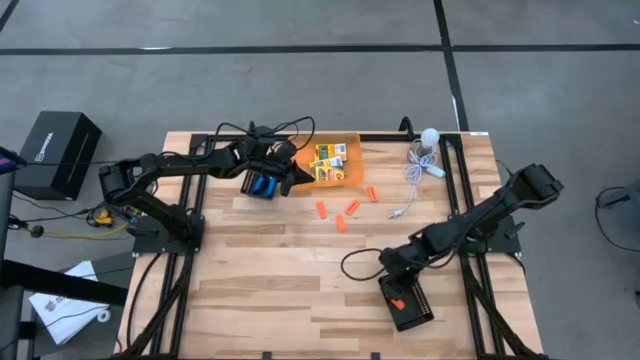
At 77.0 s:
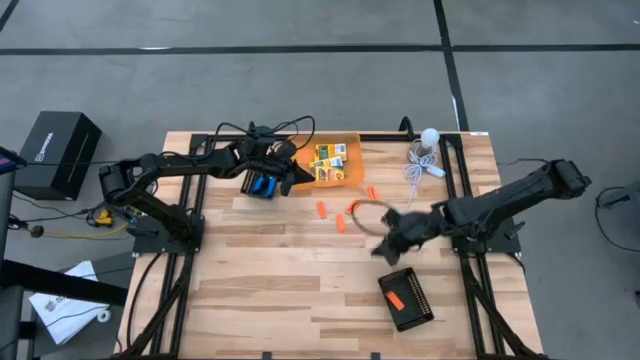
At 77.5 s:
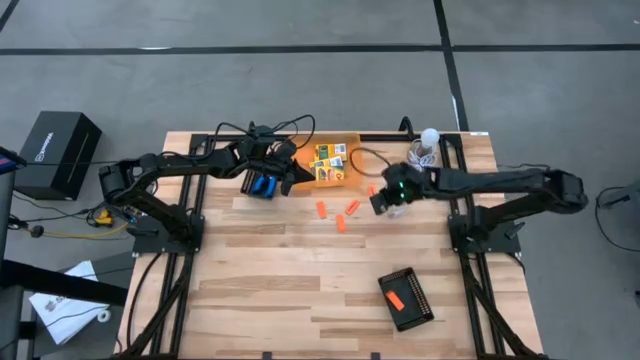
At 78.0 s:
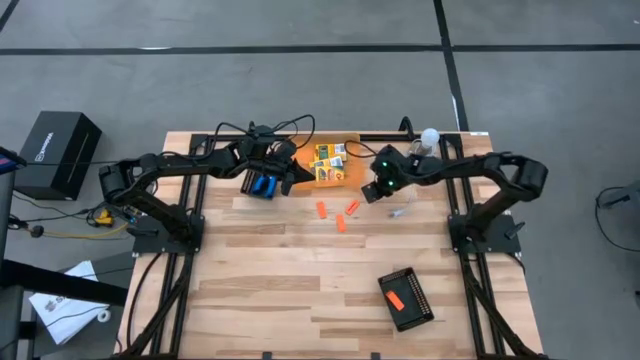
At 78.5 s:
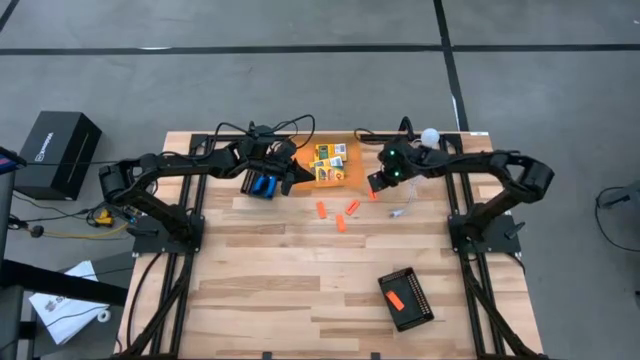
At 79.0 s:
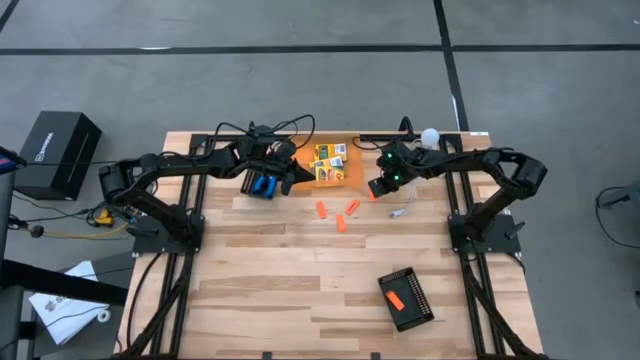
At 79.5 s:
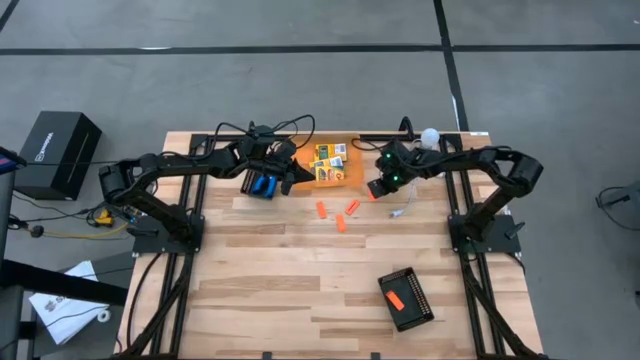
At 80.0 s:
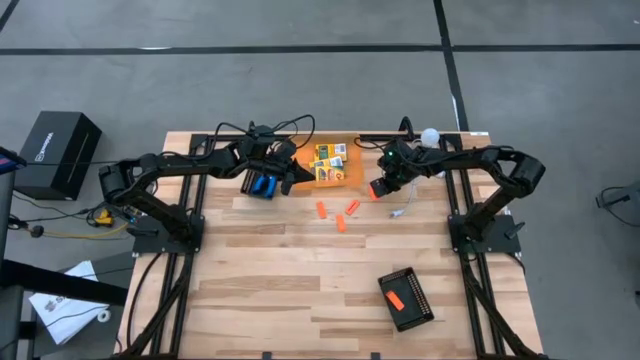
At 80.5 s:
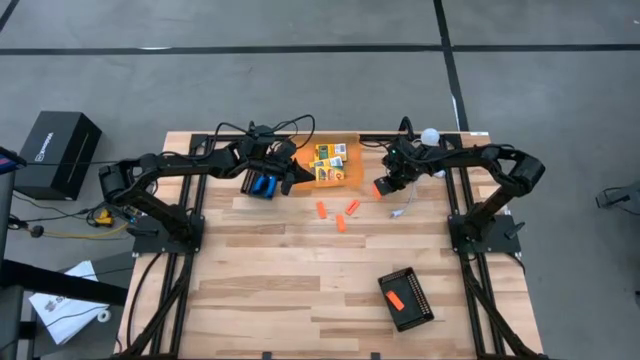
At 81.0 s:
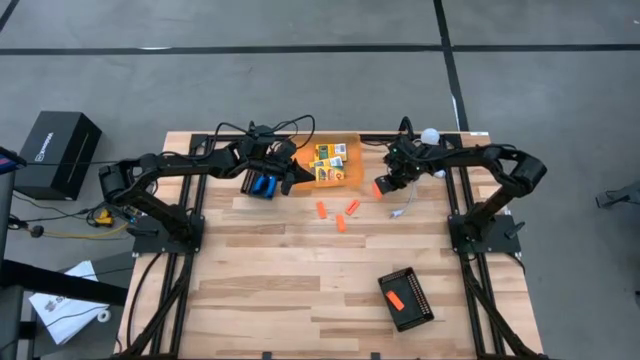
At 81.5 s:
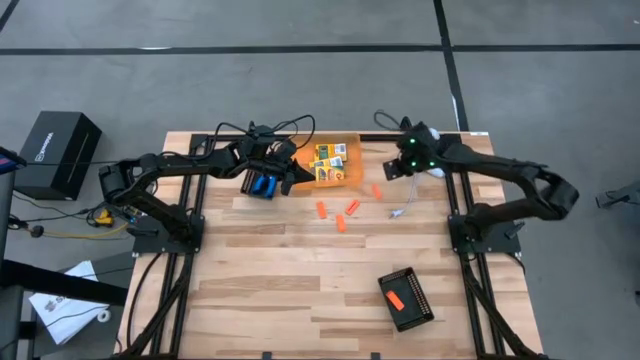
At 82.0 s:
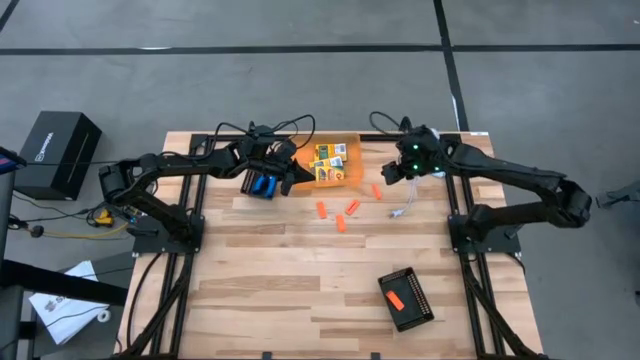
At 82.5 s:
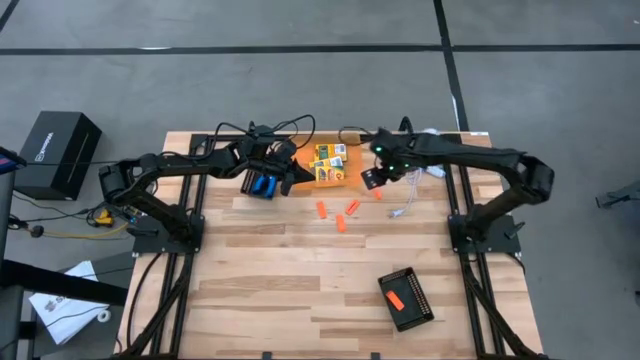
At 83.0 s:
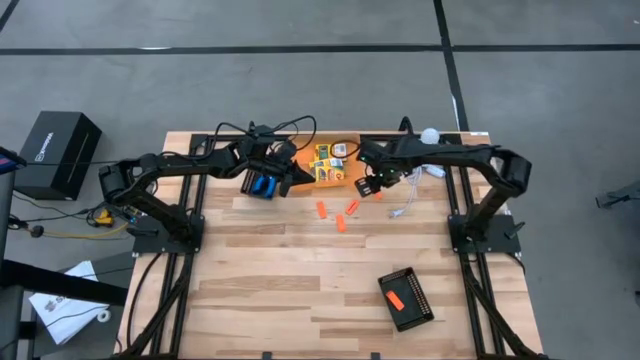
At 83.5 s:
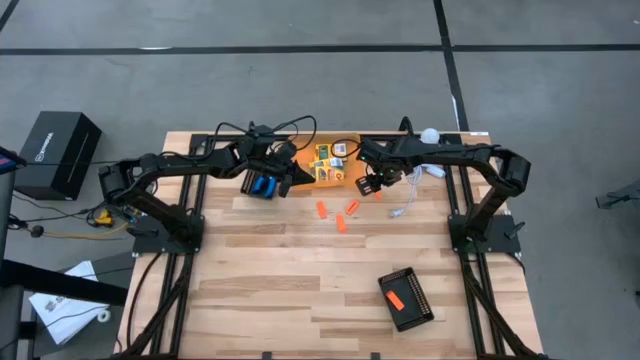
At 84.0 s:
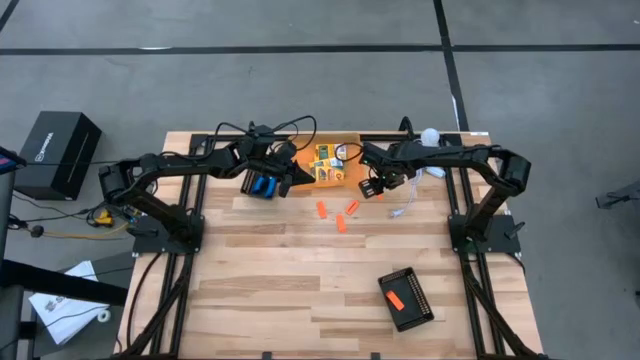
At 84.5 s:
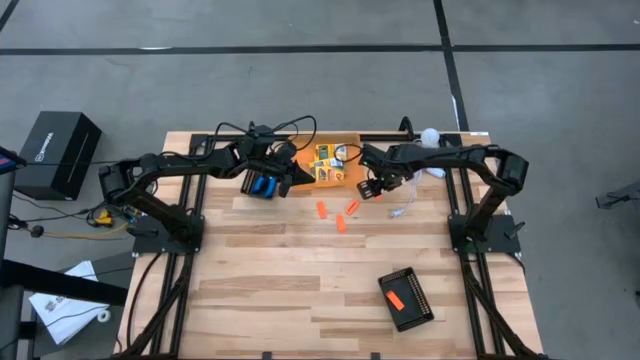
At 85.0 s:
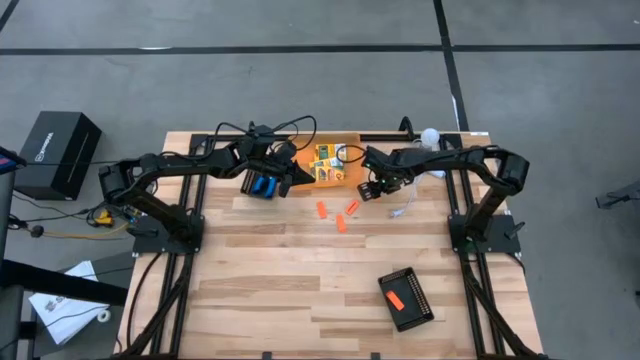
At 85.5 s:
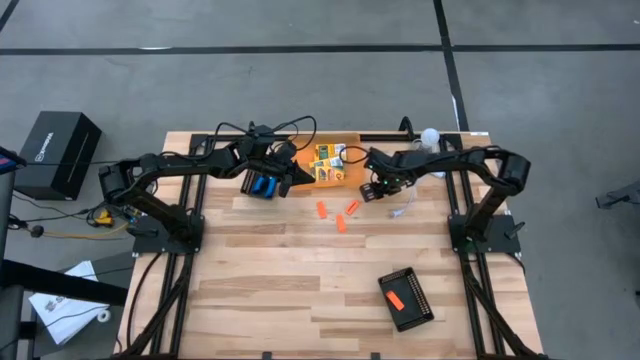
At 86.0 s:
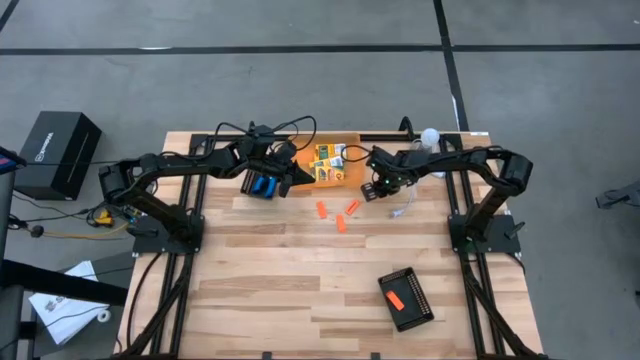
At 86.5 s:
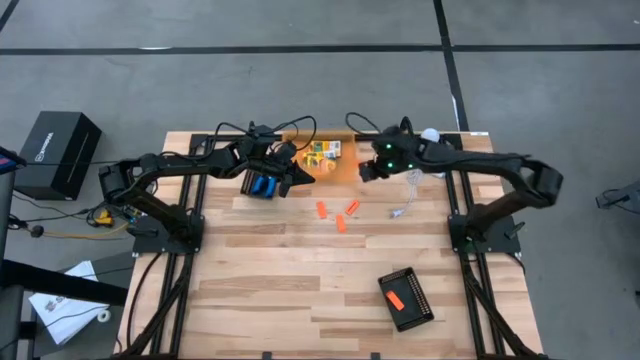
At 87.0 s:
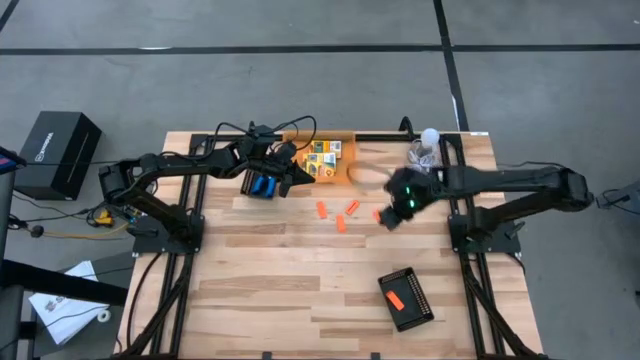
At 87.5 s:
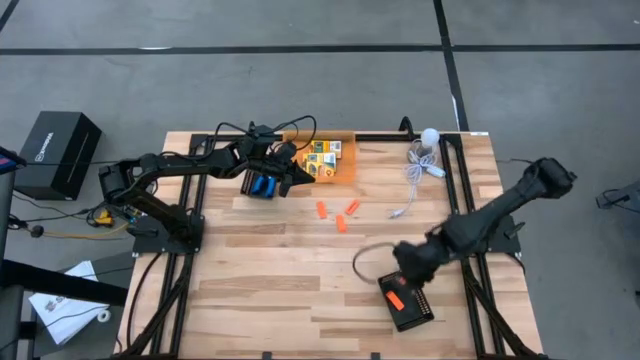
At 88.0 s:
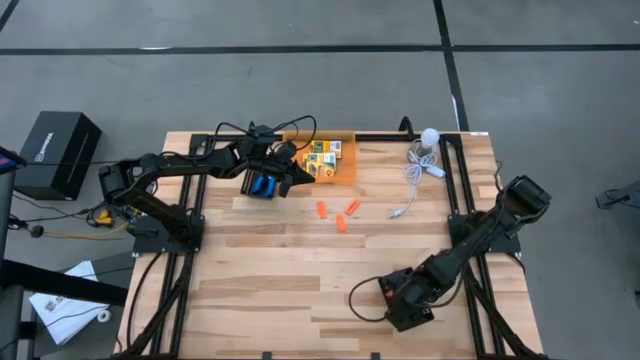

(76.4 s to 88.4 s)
Task: Pick & Place School Supplies
Put the orange eraser into the bottom black bin

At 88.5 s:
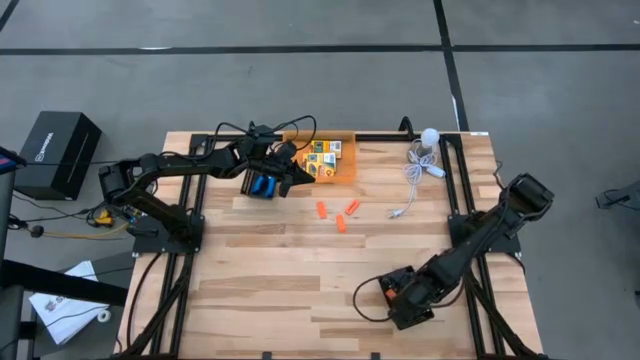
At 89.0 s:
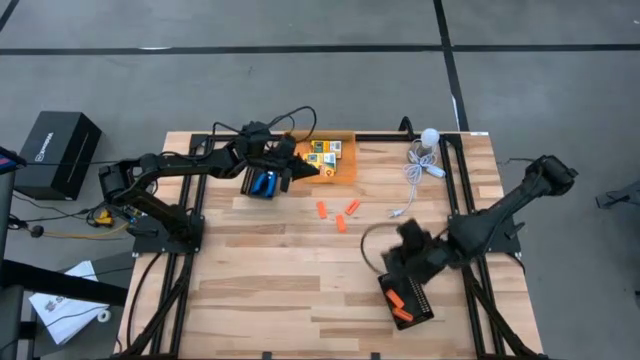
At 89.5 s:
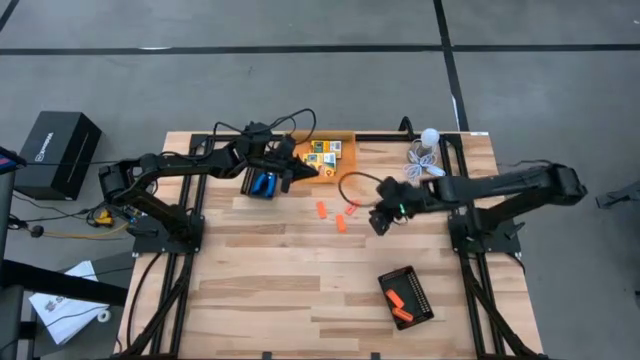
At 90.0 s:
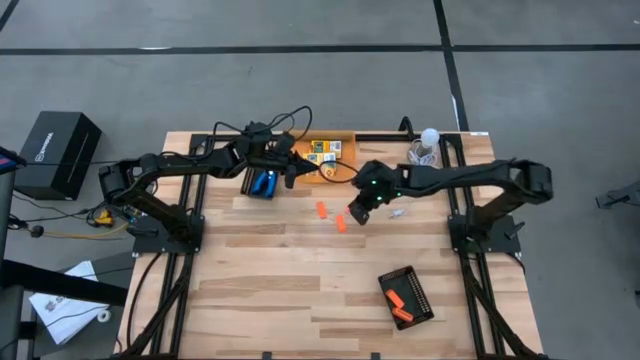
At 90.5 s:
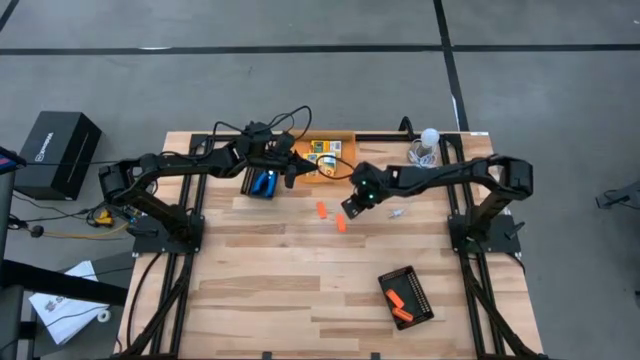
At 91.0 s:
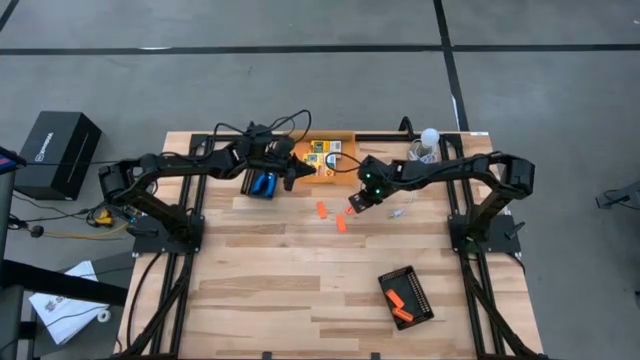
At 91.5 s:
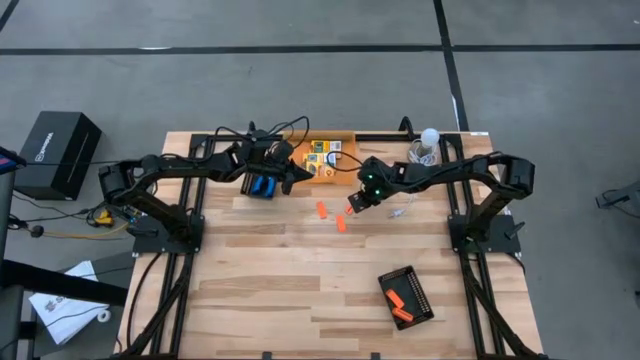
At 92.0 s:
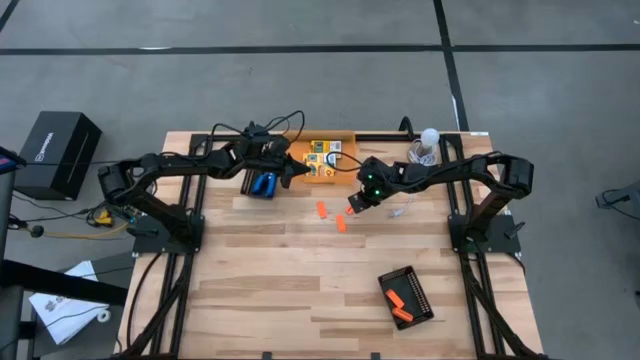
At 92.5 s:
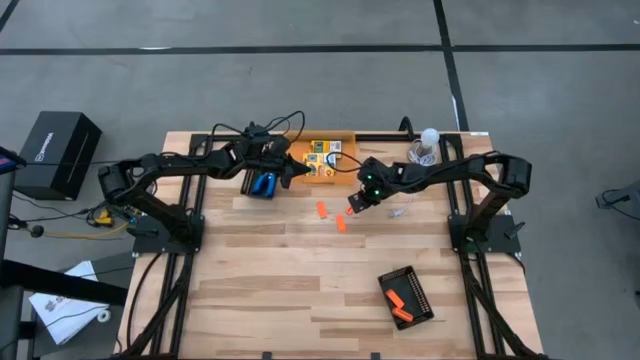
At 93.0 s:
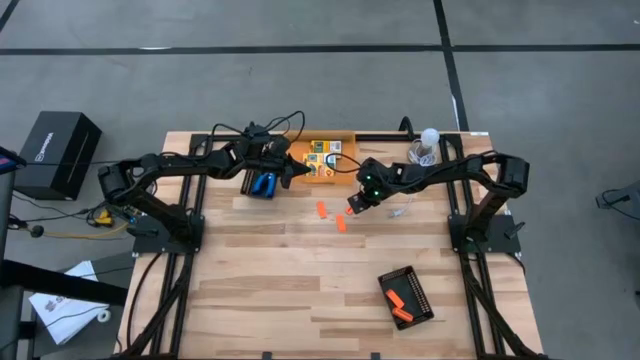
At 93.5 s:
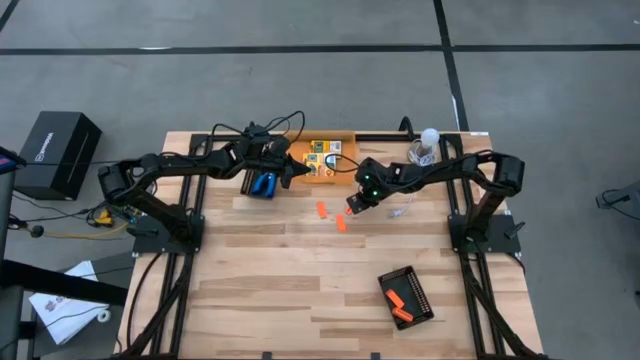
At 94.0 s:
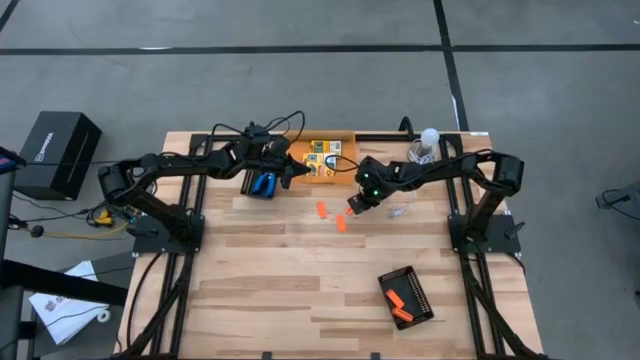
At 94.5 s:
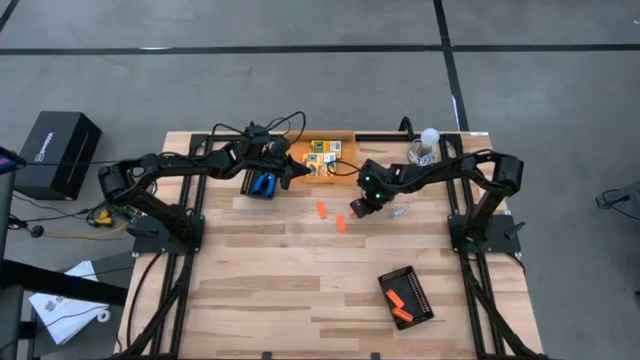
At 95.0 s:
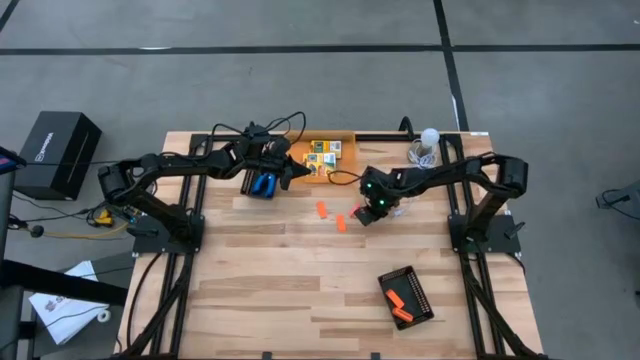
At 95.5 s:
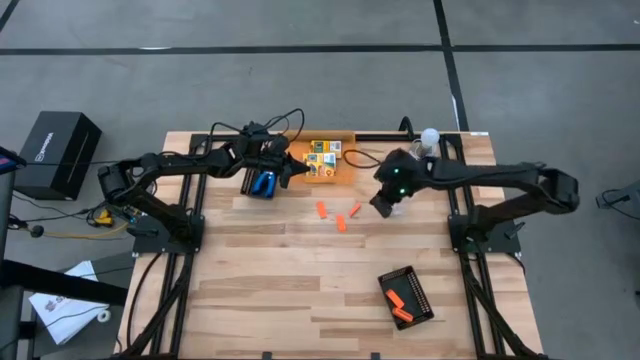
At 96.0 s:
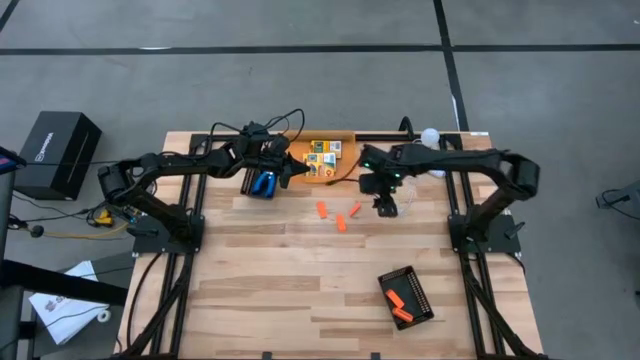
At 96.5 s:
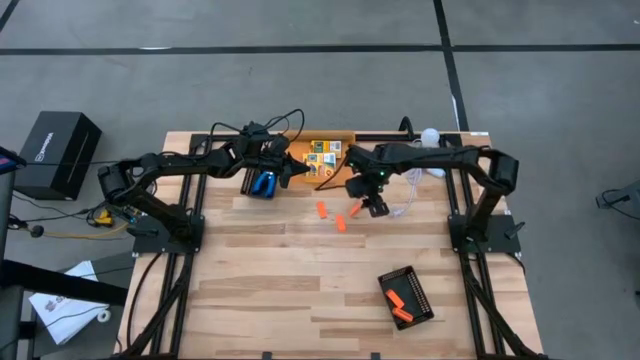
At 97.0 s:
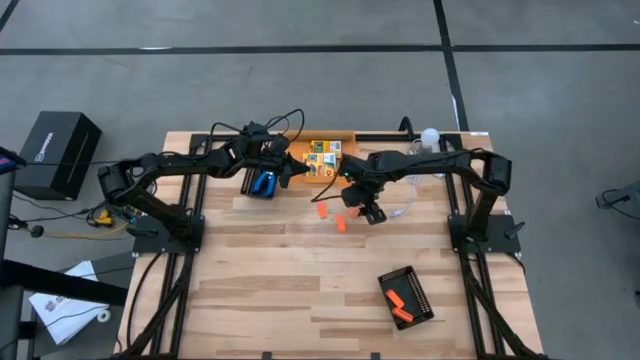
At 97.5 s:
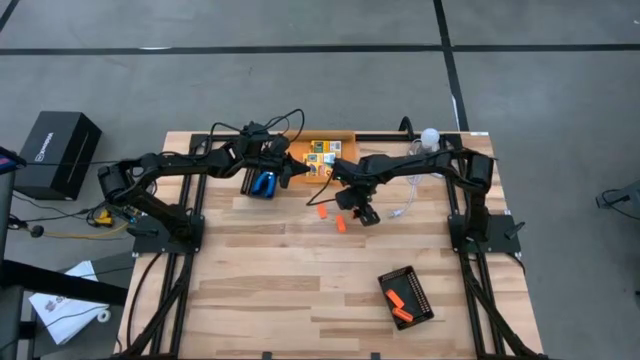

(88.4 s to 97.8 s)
Put the orange eraser into the bottom black bin

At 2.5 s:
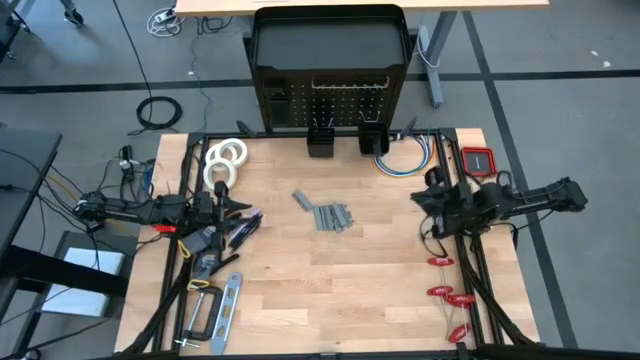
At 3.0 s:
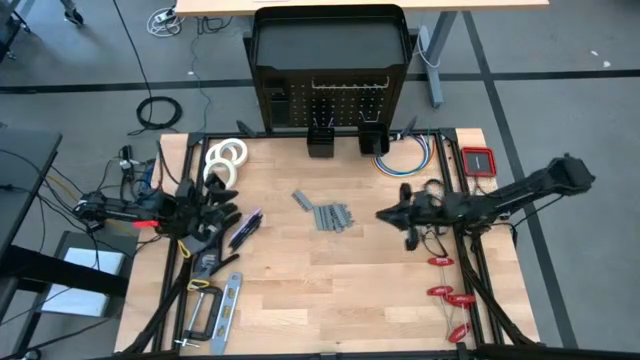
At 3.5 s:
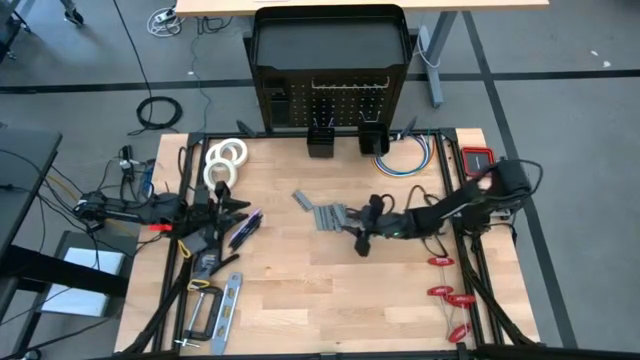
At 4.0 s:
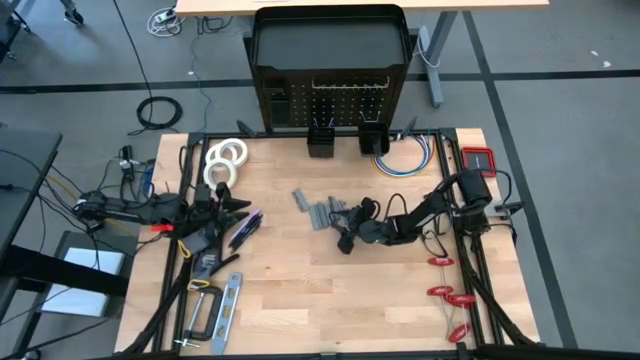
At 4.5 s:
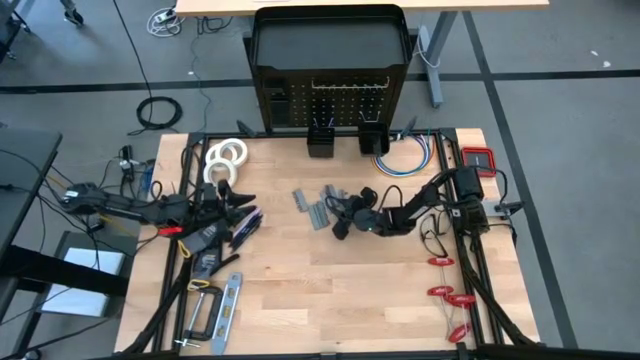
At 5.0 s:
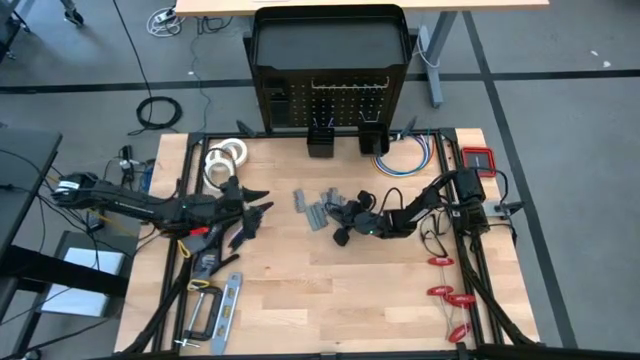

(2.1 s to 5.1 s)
Task: Hang tools onto peg board
Put the terminal block into the left peg board bin
